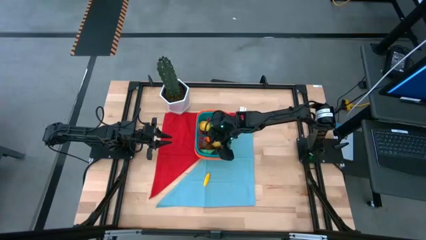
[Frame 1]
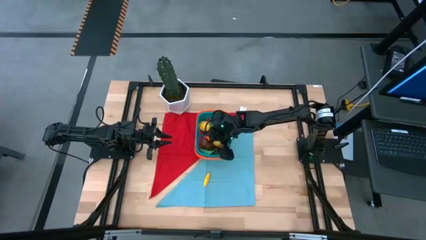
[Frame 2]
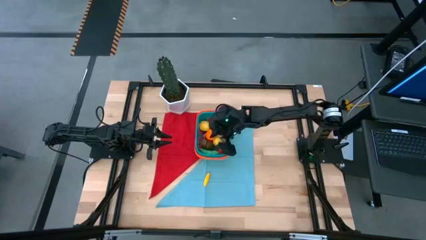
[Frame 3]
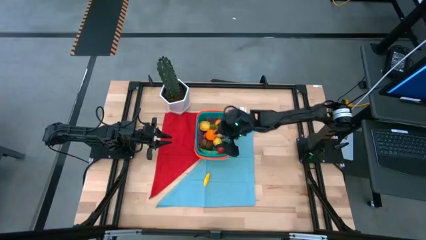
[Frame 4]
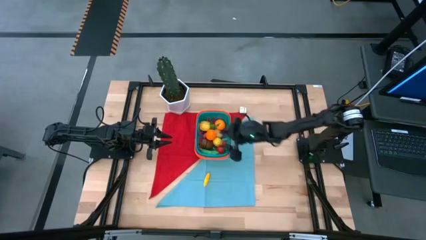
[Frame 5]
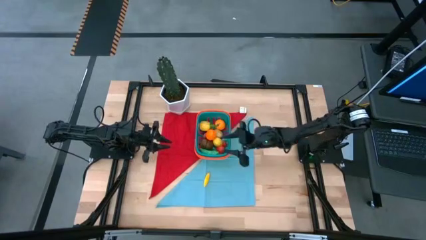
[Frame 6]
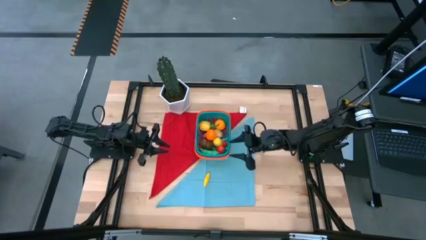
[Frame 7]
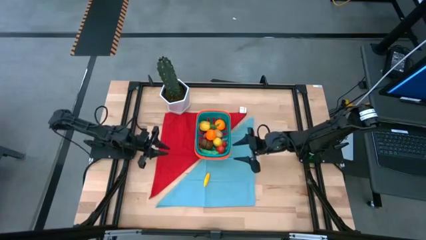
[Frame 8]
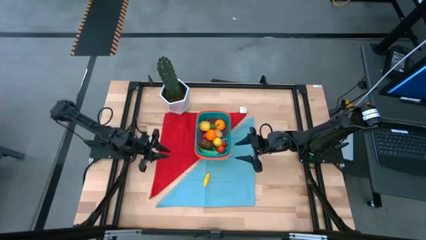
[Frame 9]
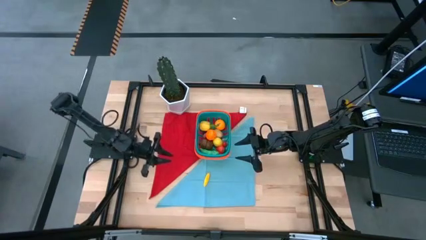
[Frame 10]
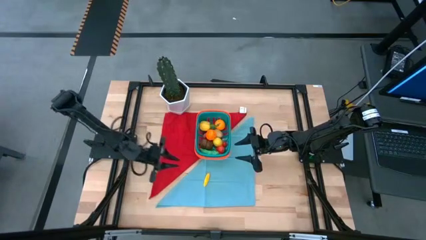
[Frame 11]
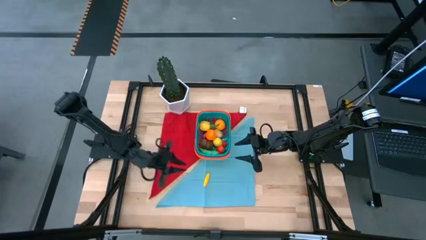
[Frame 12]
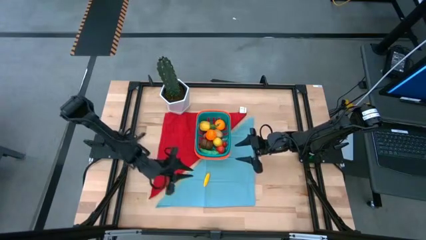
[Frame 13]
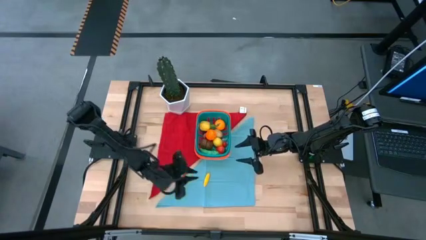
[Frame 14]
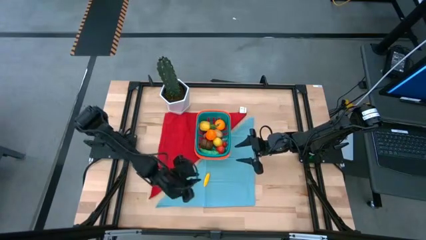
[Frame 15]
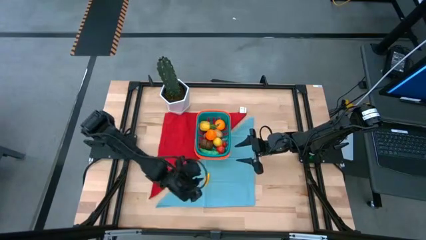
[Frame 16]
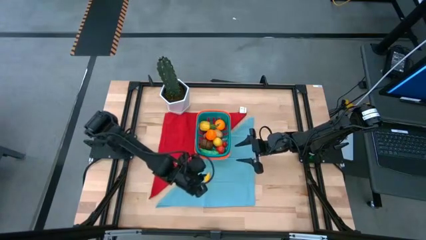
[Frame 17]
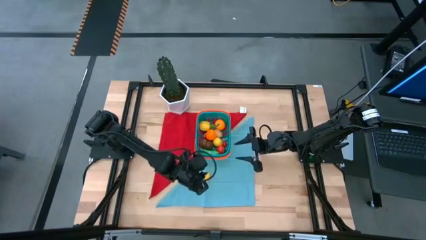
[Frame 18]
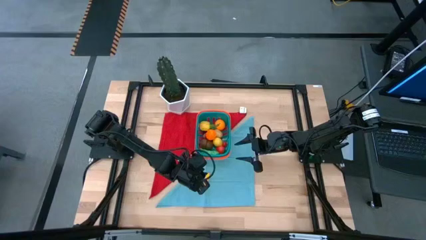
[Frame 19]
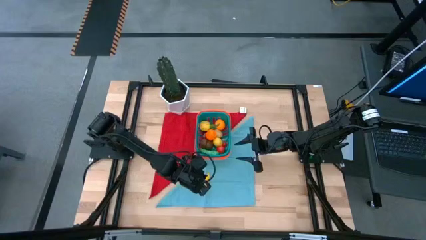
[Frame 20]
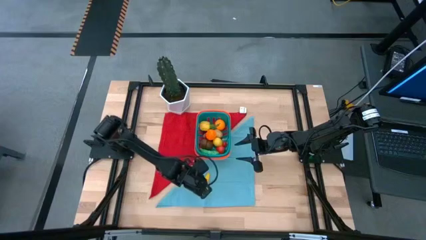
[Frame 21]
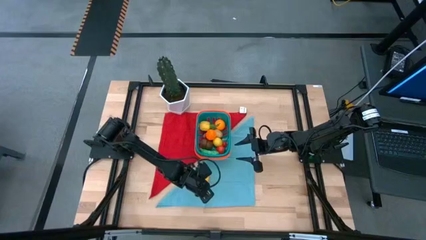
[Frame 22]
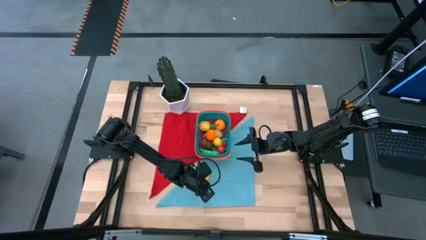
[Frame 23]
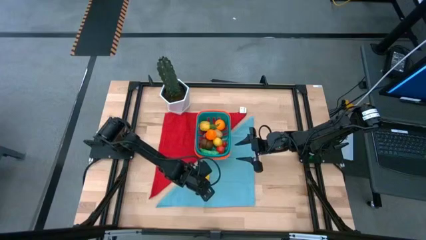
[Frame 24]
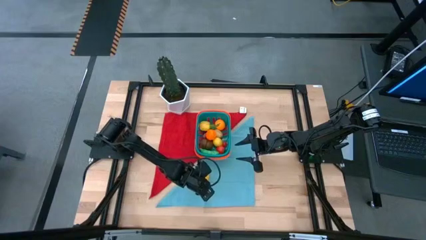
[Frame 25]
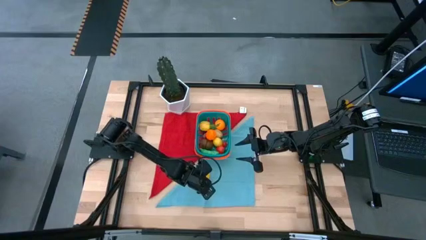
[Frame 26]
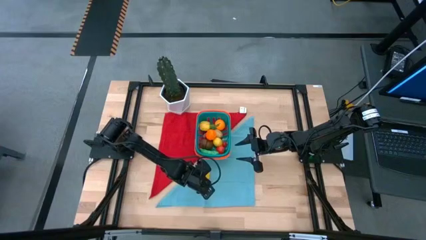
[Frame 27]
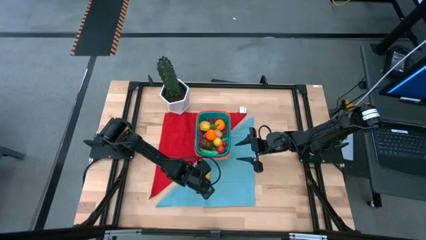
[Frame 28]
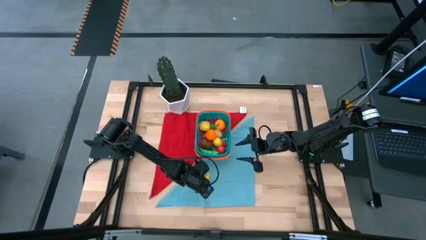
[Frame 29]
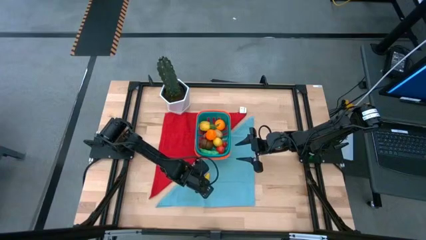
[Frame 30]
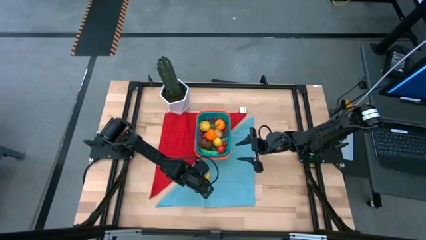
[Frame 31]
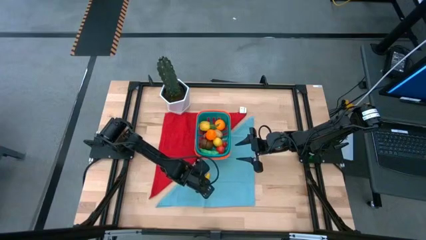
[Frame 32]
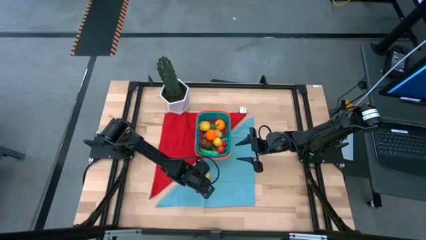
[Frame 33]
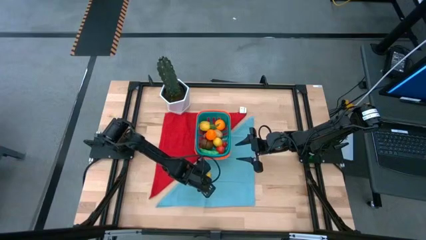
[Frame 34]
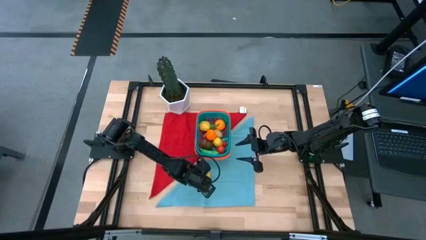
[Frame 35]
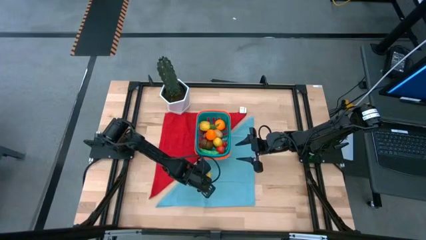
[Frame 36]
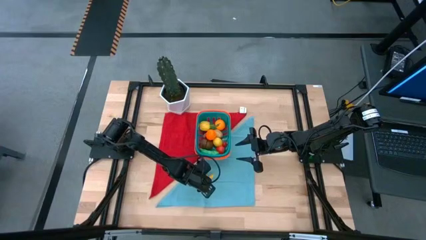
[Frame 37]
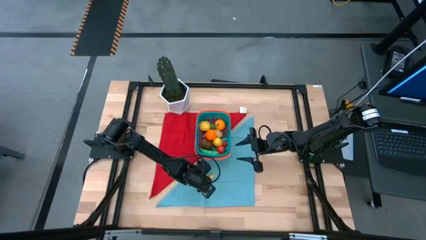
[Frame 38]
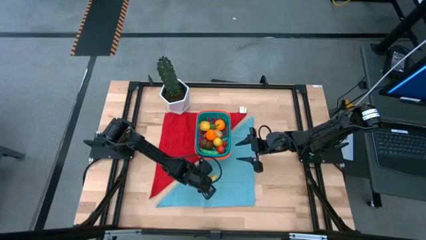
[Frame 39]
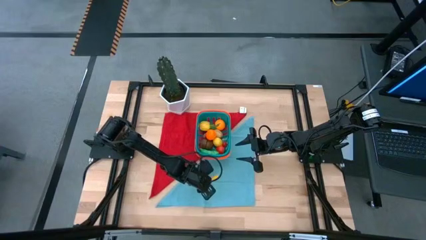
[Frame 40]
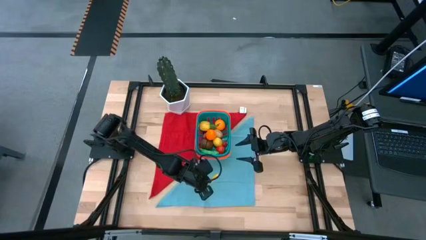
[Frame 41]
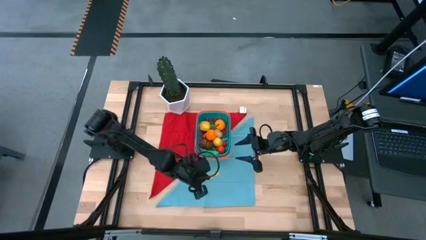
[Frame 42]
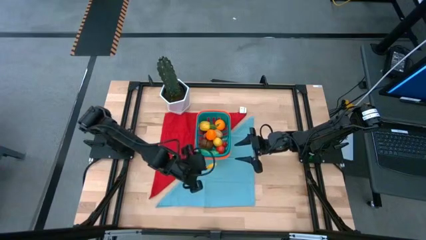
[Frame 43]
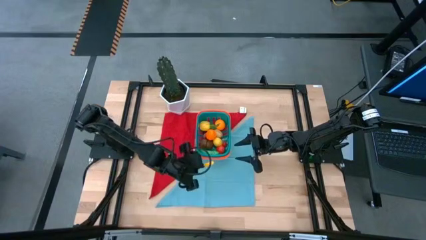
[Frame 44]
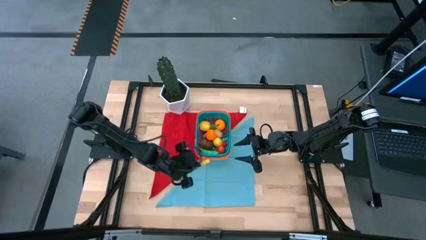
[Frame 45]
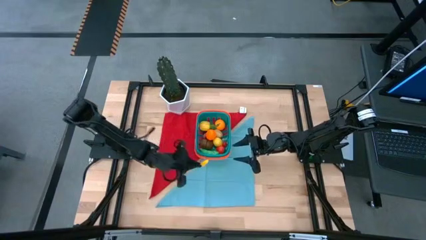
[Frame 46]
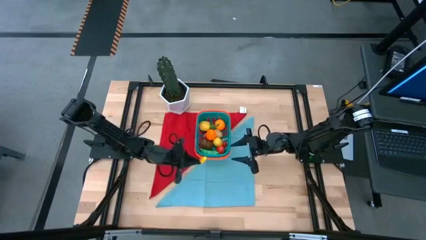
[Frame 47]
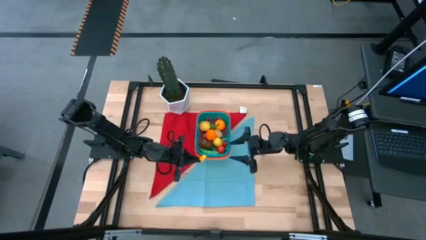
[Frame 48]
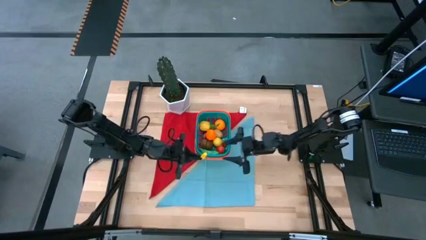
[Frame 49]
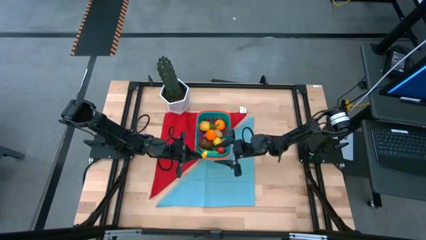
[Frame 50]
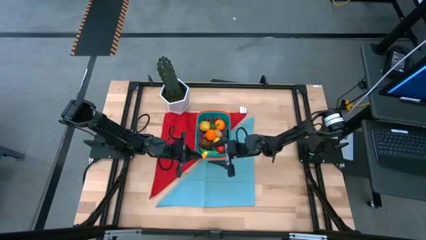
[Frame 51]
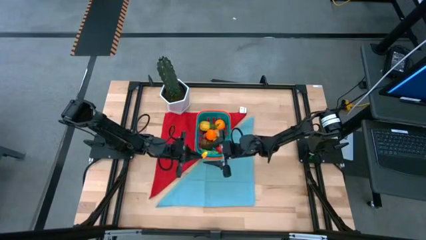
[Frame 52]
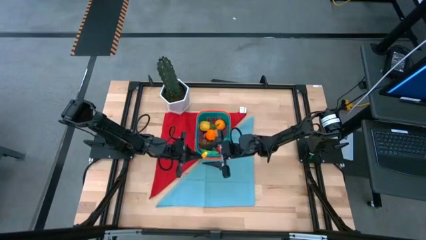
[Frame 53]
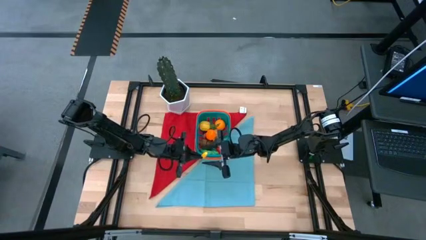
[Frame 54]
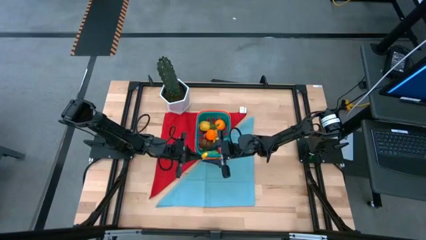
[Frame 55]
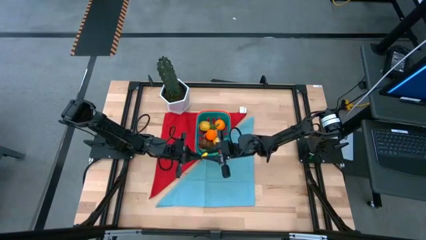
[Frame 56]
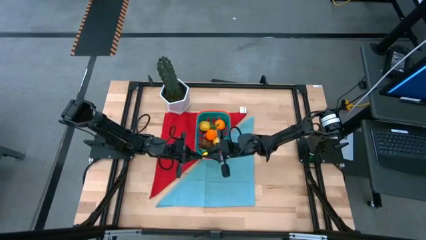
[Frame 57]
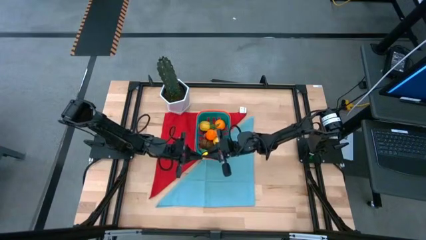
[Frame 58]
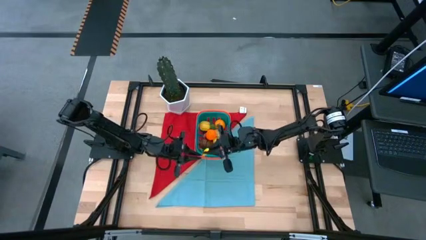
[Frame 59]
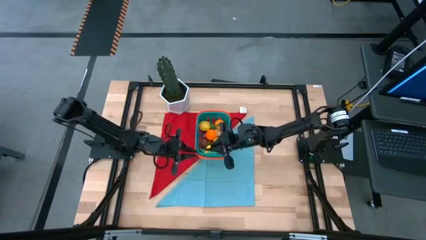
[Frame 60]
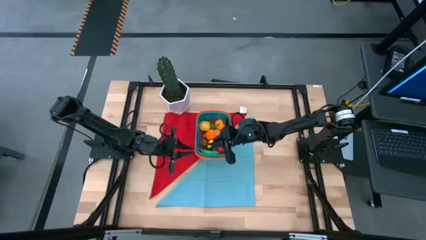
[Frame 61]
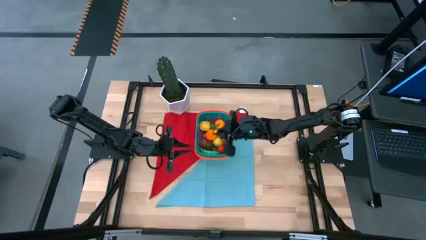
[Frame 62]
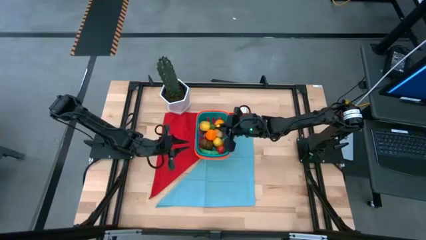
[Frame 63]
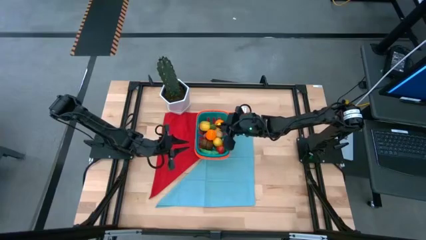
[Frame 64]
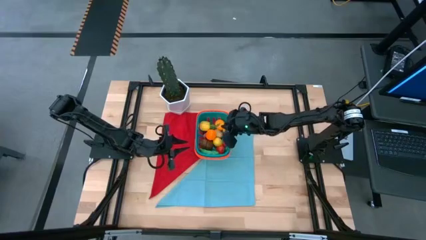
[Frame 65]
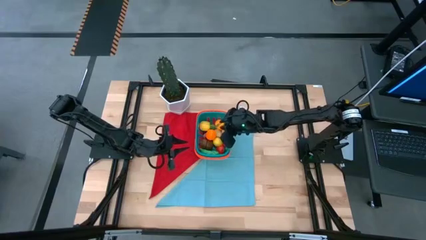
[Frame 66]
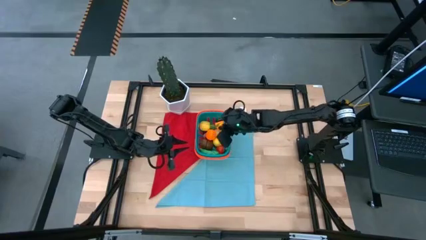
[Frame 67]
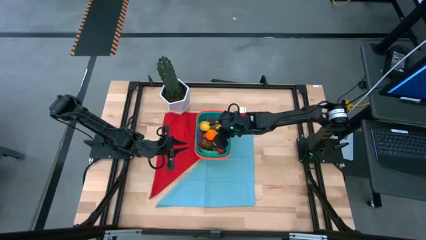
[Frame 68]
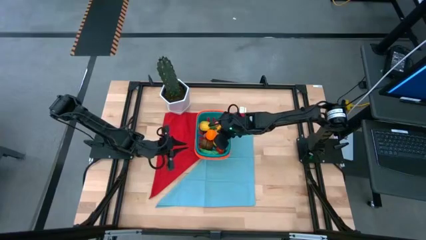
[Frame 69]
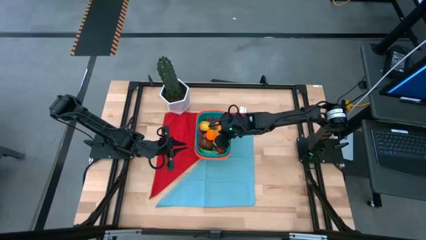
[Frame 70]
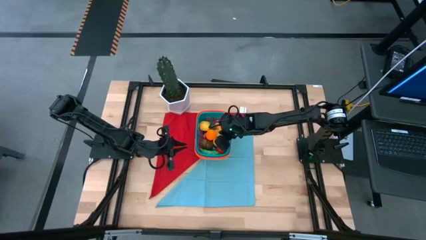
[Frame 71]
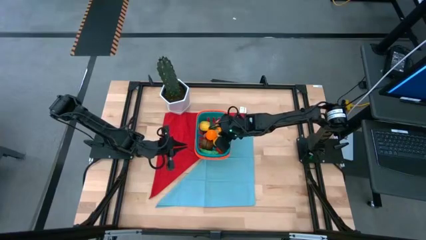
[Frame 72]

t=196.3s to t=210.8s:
Task: Pick and placing Produce into tupperware
Put the corn into the basket

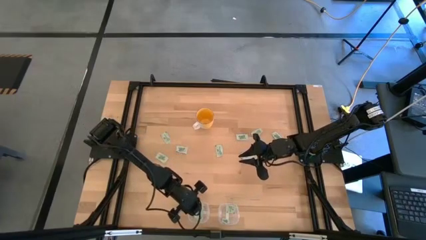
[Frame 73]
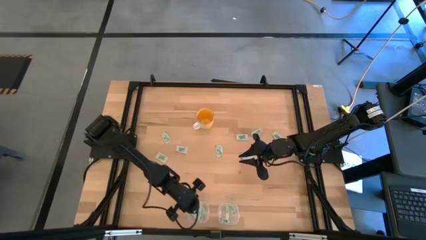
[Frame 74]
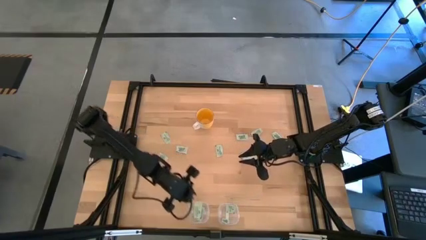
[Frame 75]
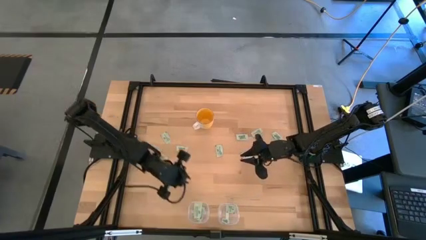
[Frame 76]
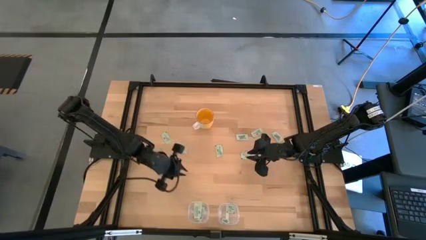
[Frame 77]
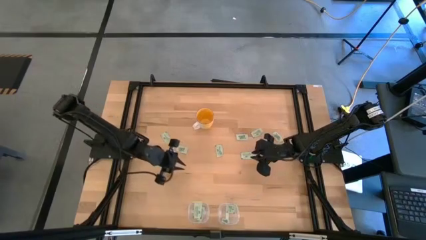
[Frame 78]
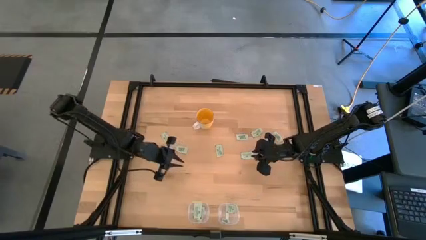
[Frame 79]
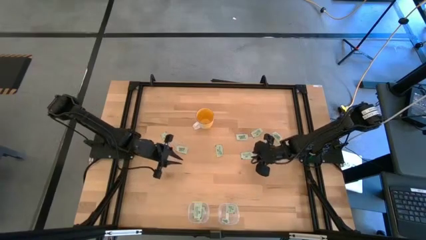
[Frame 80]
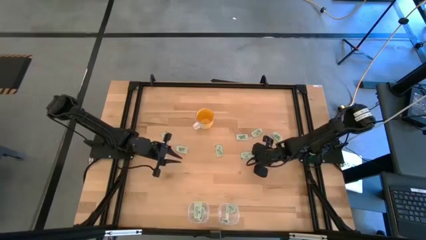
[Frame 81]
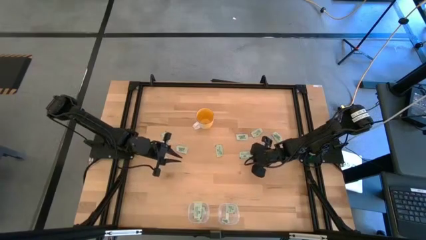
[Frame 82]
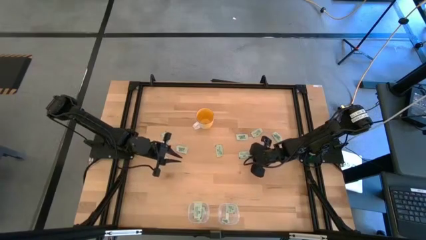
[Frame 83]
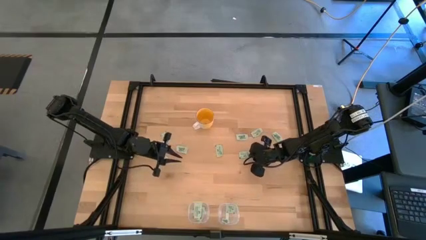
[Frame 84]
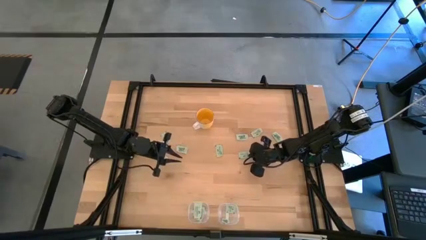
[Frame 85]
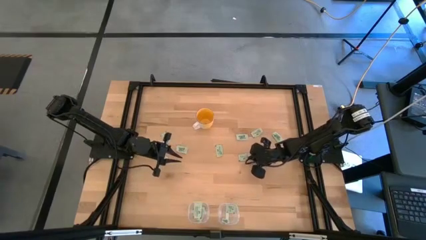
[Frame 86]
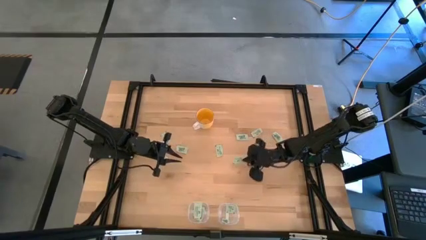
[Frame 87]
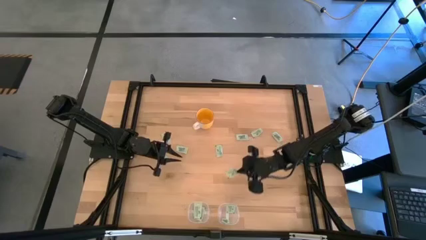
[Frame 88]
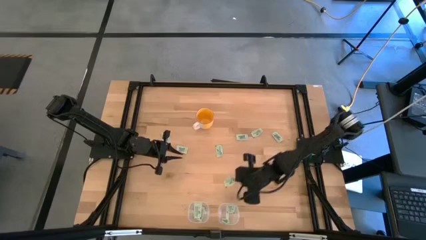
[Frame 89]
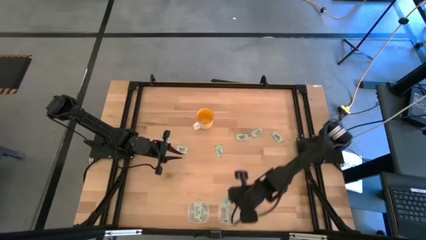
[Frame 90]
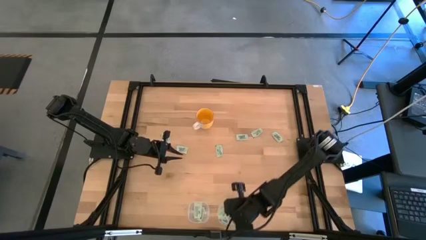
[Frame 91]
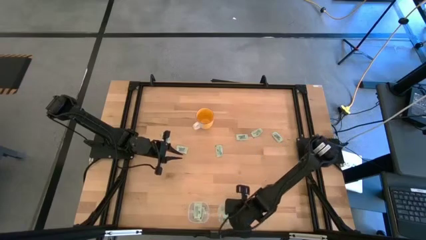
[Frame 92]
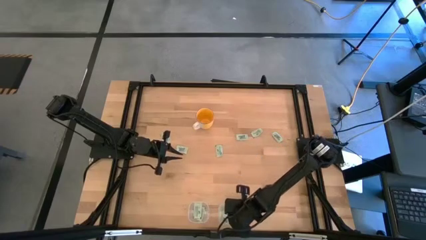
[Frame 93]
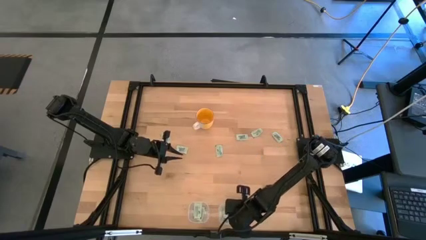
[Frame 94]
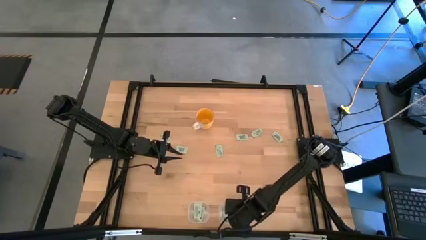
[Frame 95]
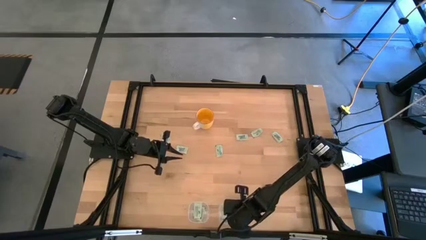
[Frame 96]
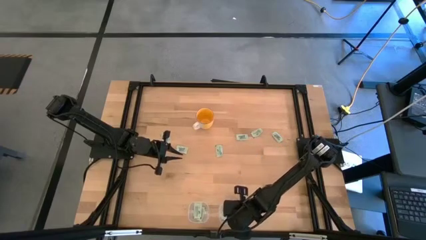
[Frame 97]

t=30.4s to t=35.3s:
Task: Pick and place items into bin
Put the green stevia packet into the right transparent bin
